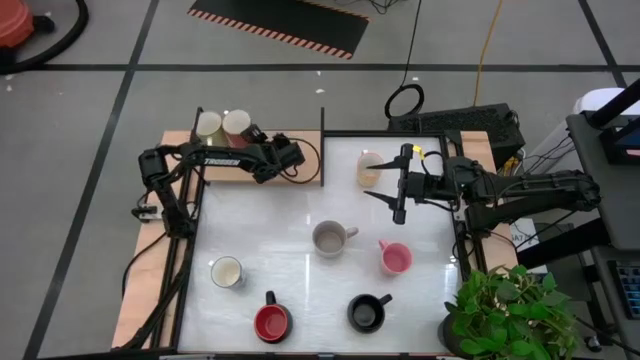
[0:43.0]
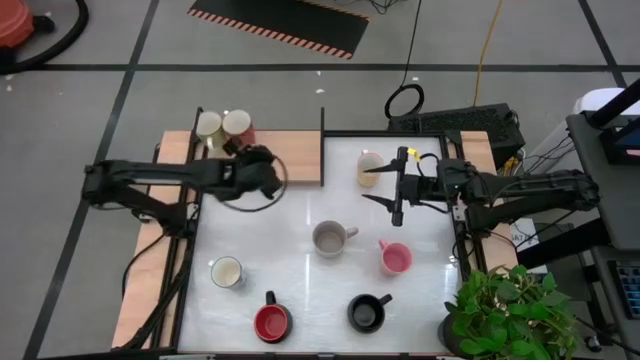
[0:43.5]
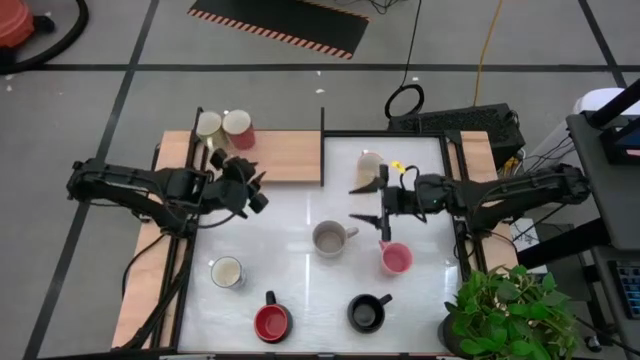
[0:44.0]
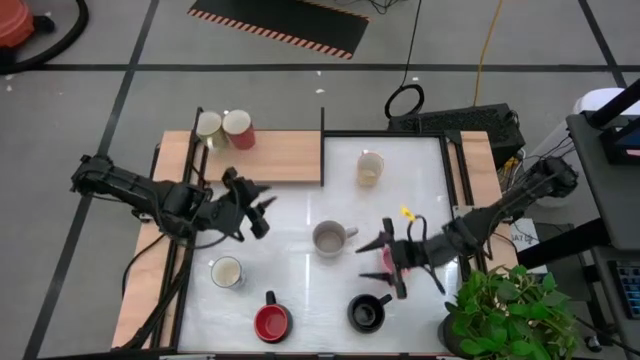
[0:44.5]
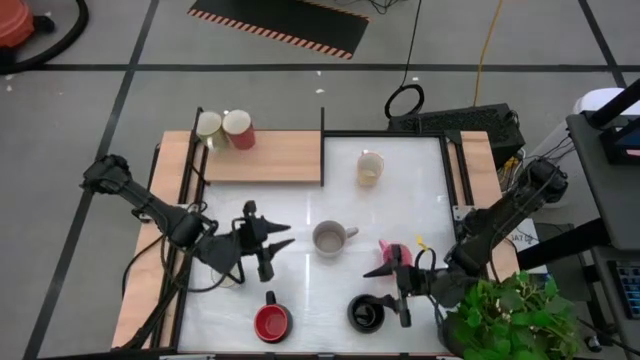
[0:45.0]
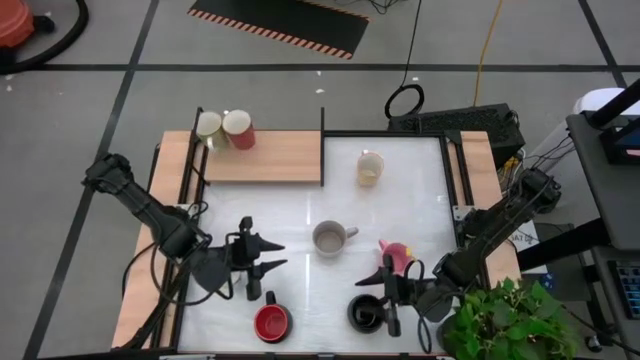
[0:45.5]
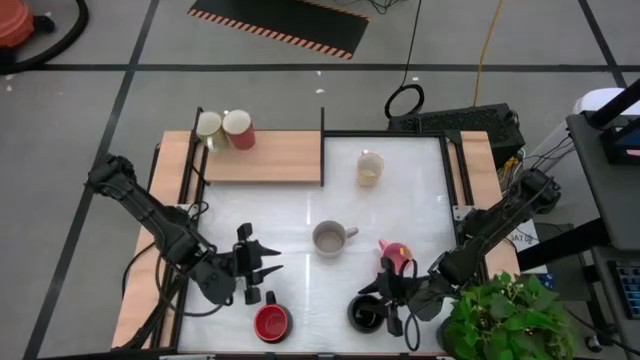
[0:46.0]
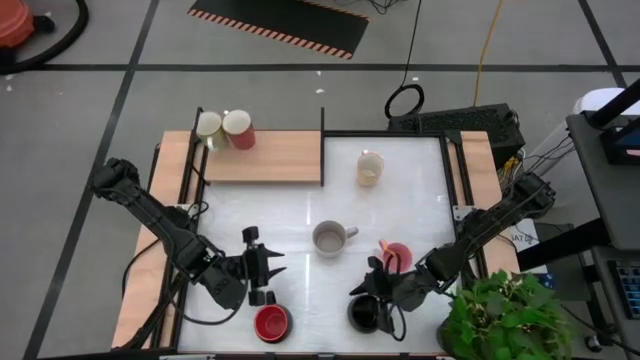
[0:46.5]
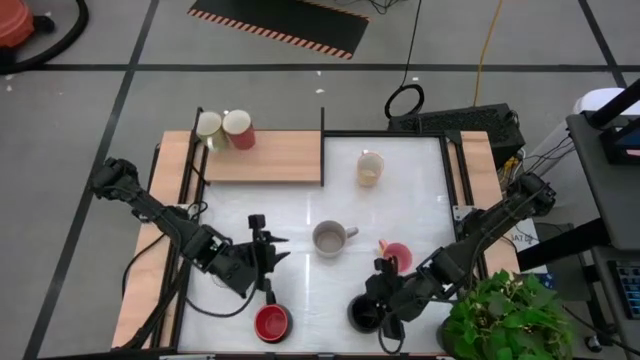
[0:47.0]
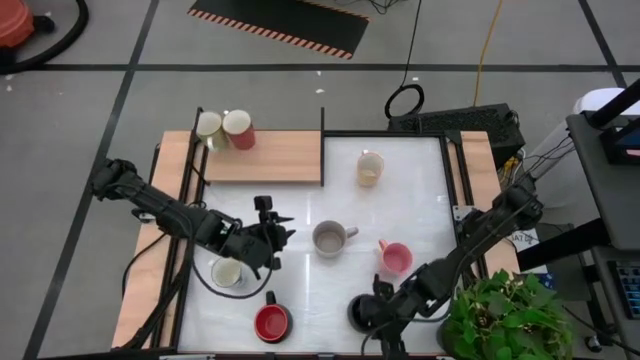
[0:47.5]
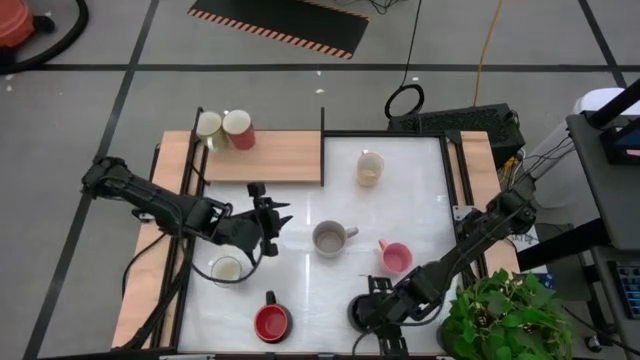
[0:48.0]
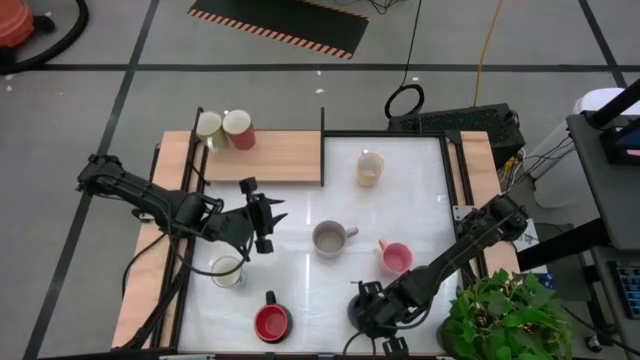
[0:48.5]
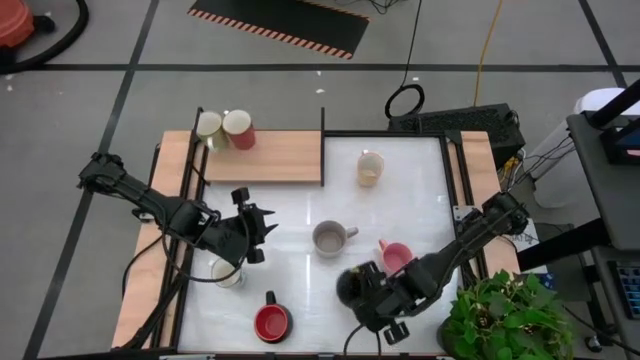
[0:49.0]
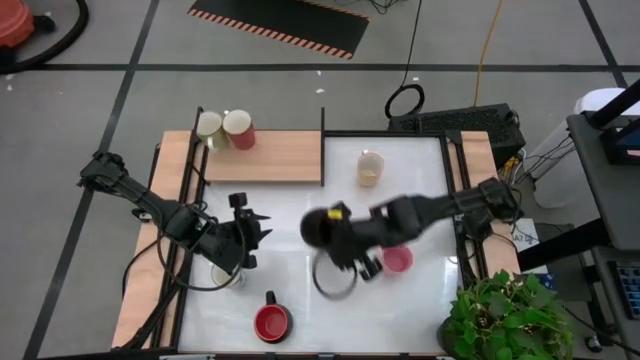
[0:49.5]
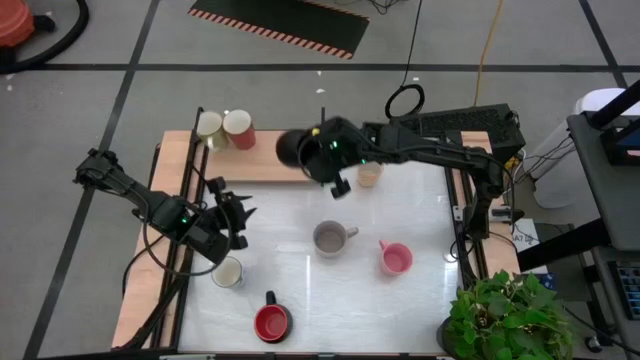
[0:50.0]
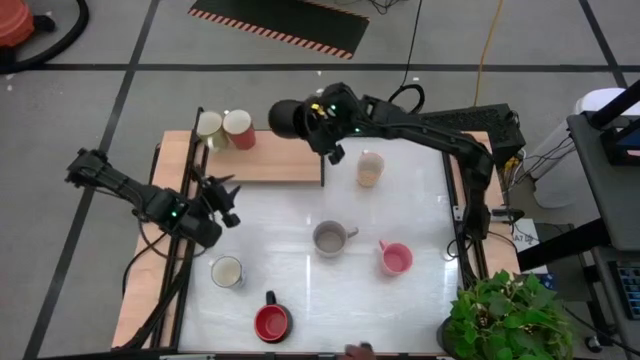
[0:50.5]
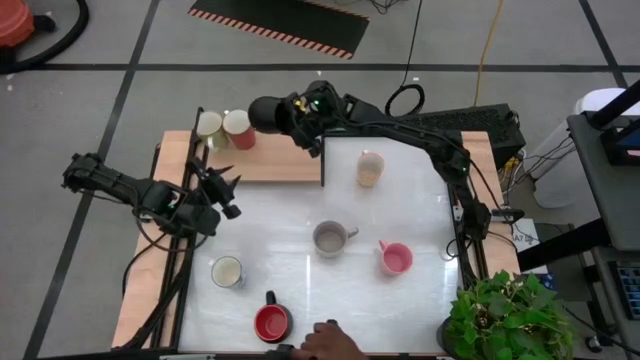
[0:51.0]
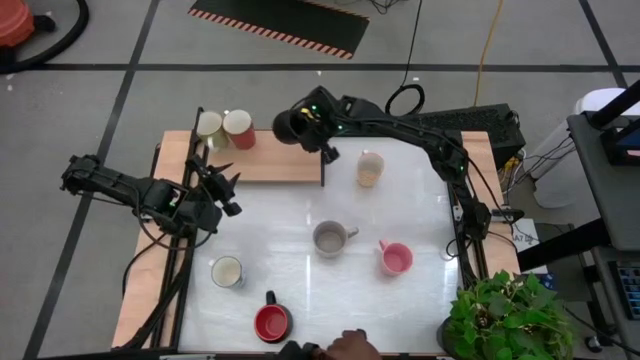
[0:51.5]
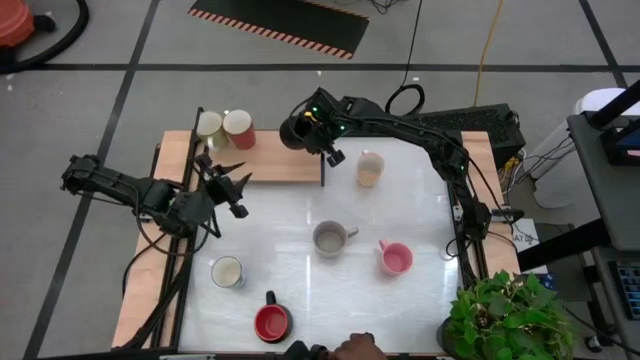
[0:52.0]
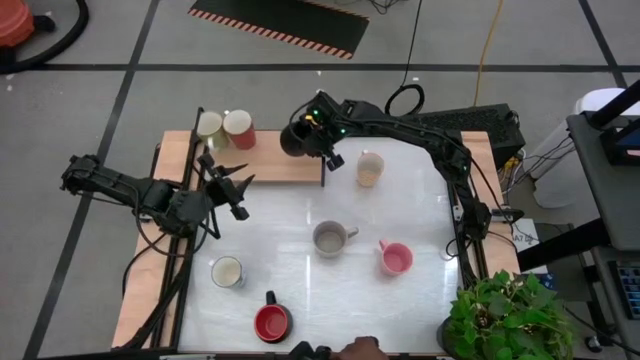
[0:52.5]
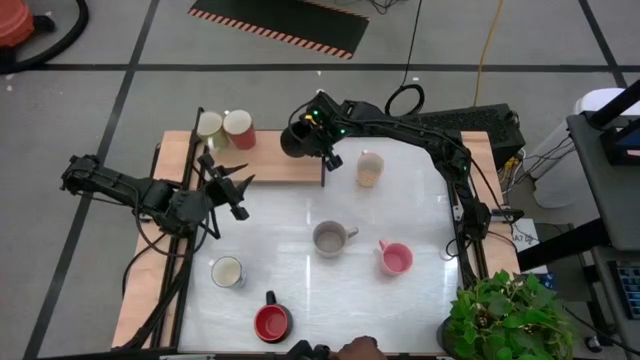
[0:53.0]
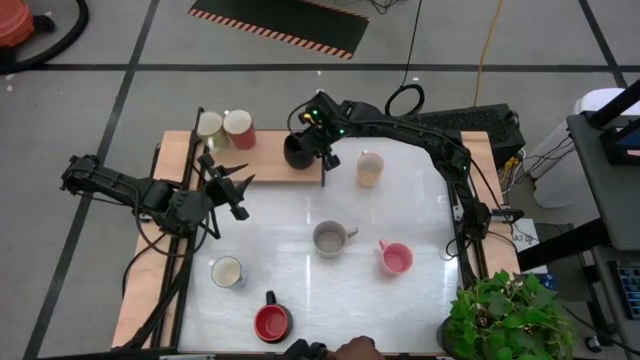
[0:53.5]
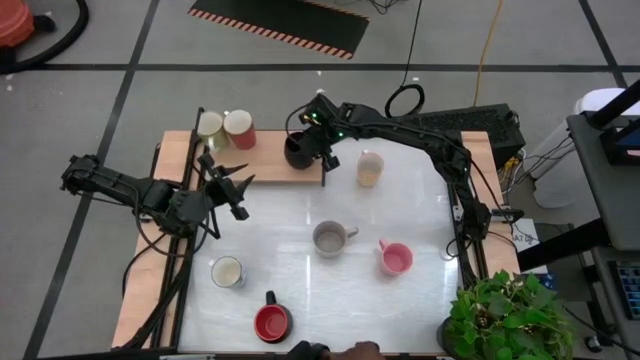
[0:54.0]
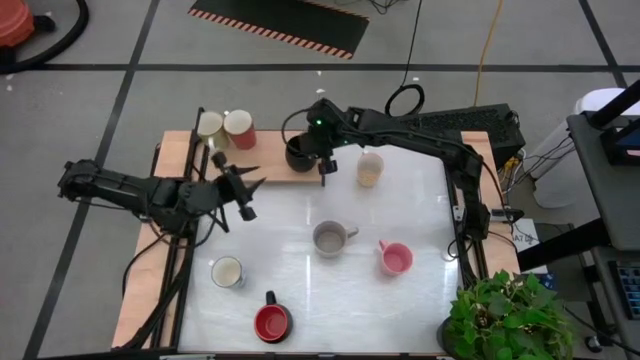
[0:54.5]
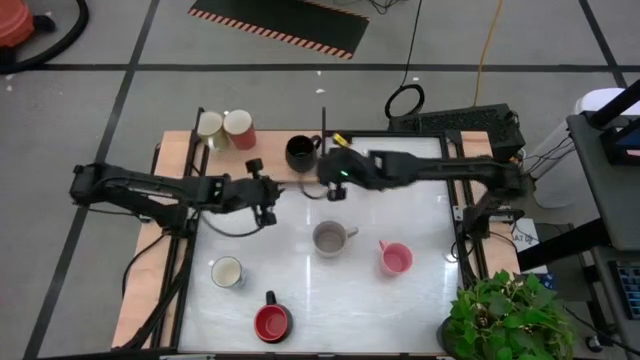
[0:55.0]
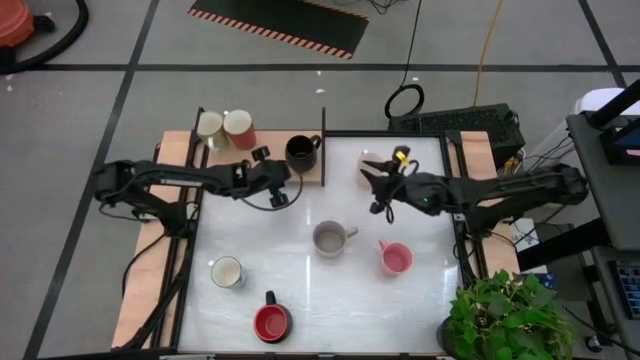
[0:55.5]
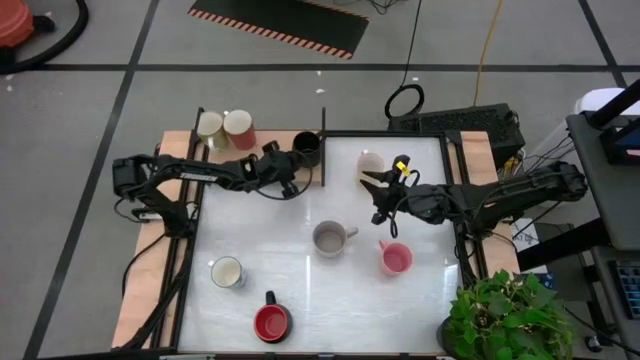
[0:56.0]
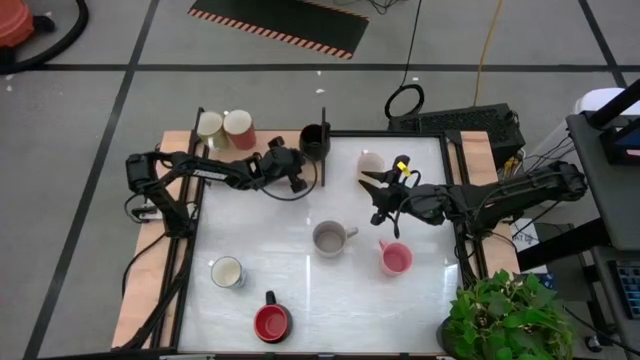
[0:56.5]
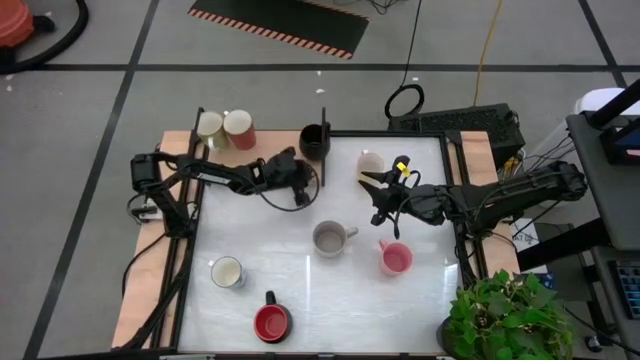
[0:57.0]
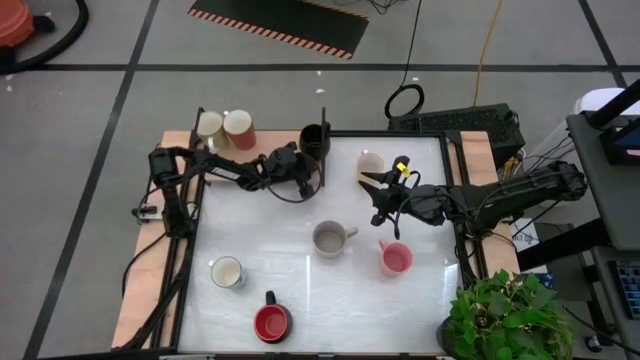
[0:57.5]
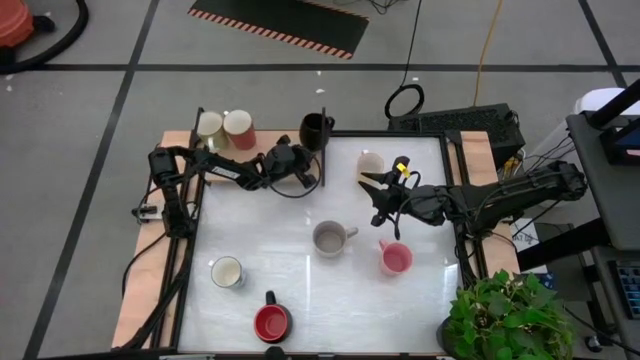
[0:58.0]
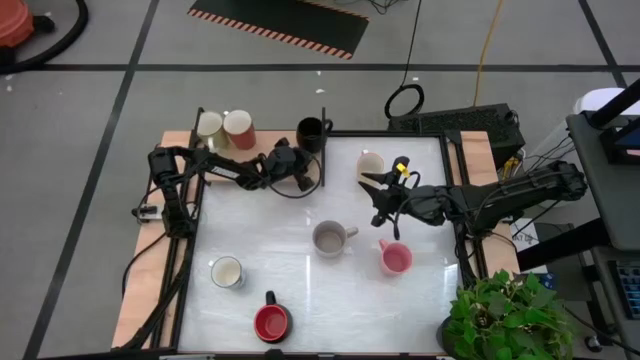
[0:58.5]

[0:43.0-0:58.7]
Task: Place coffee mugs
Put the black mug on the shelf

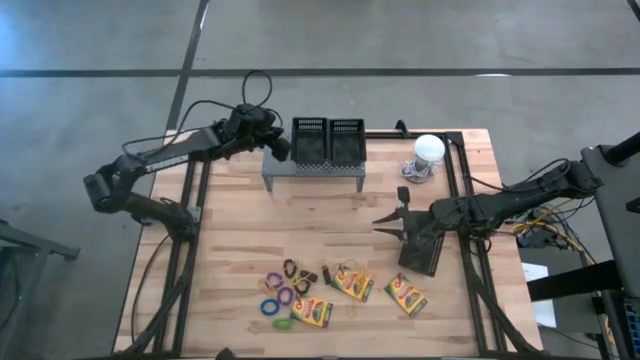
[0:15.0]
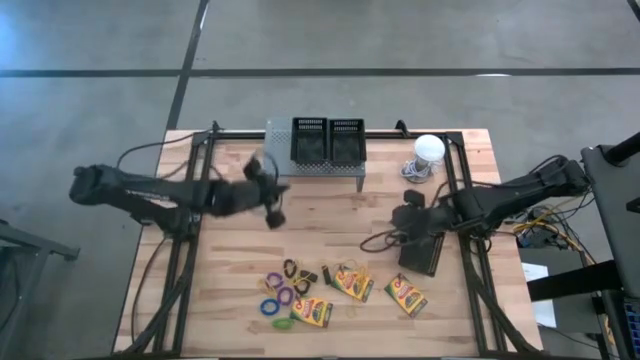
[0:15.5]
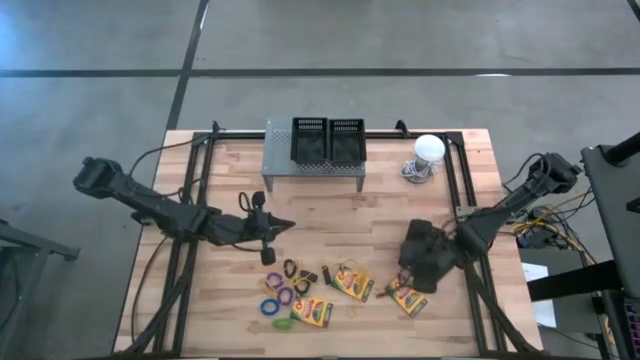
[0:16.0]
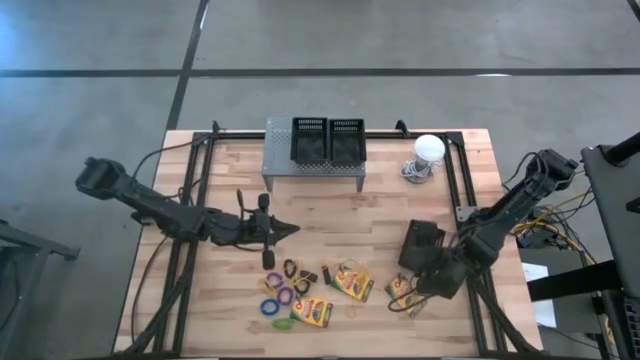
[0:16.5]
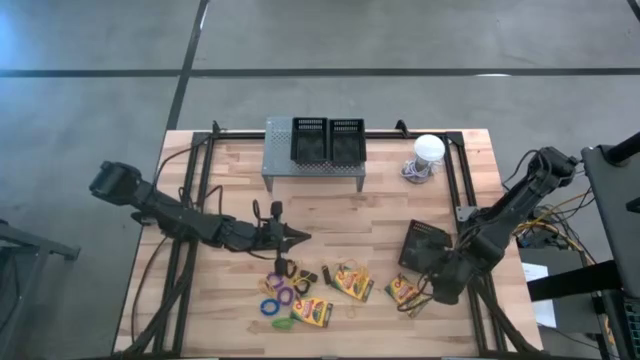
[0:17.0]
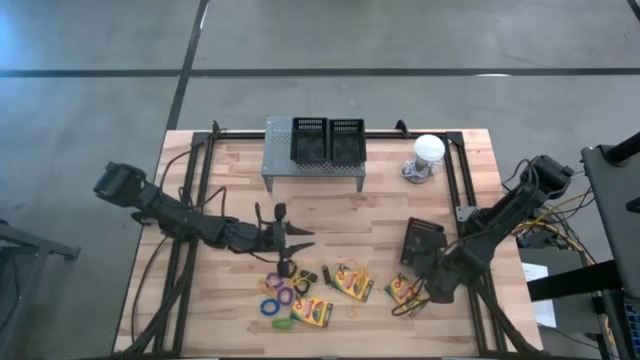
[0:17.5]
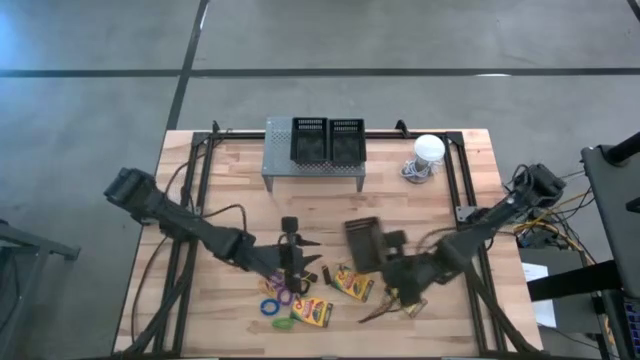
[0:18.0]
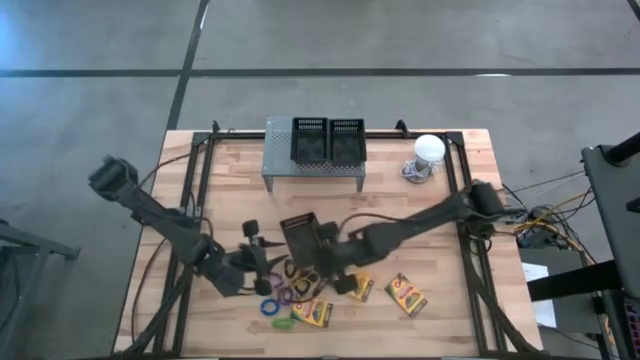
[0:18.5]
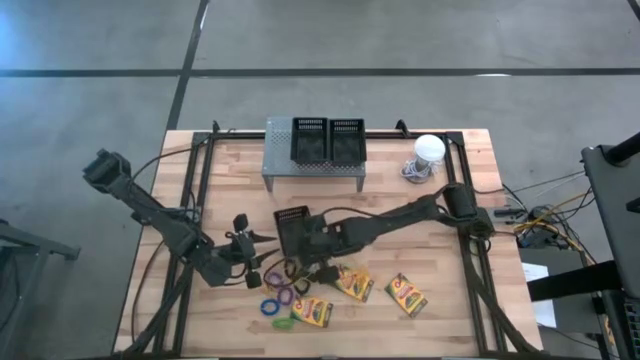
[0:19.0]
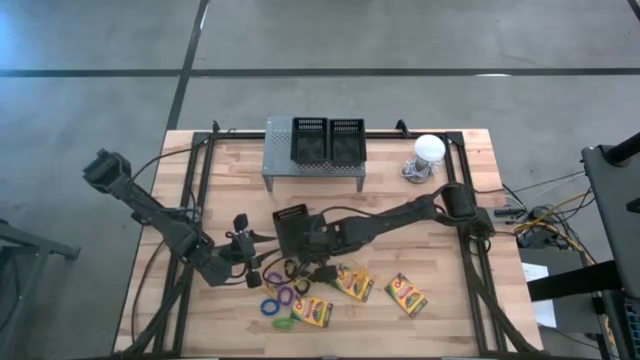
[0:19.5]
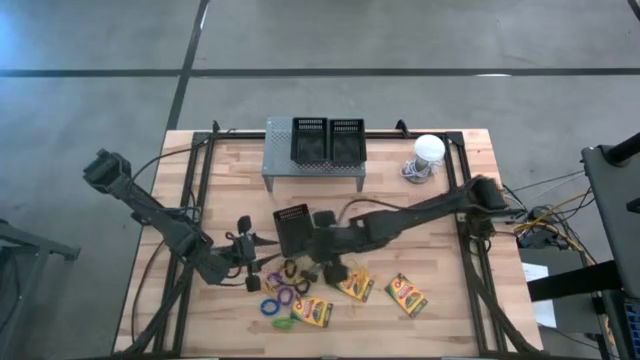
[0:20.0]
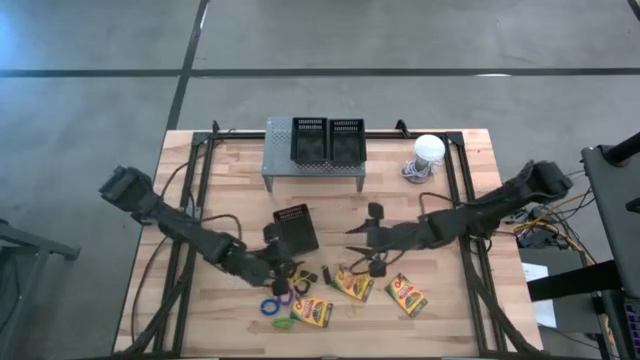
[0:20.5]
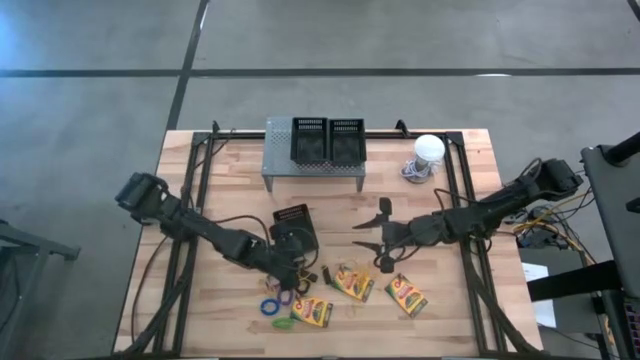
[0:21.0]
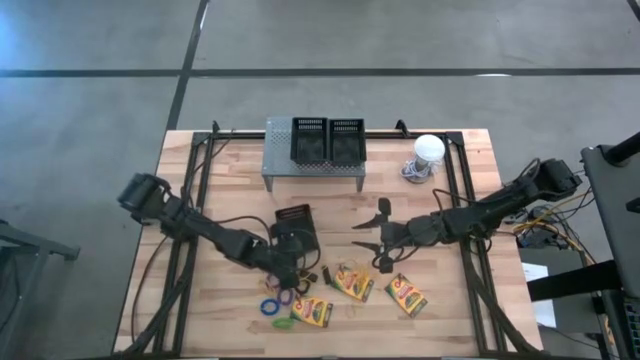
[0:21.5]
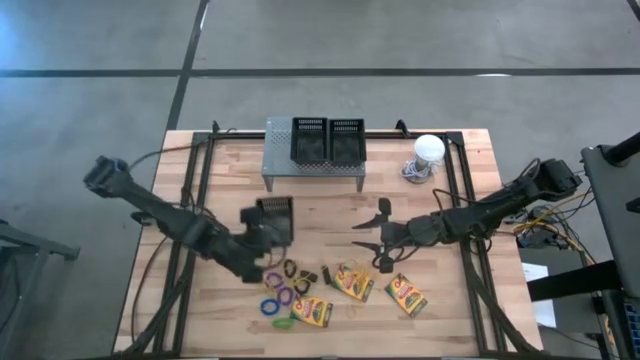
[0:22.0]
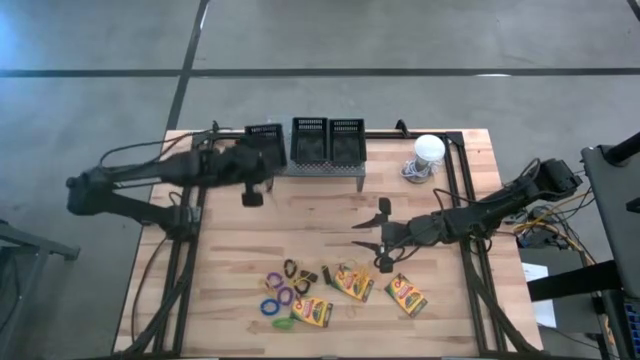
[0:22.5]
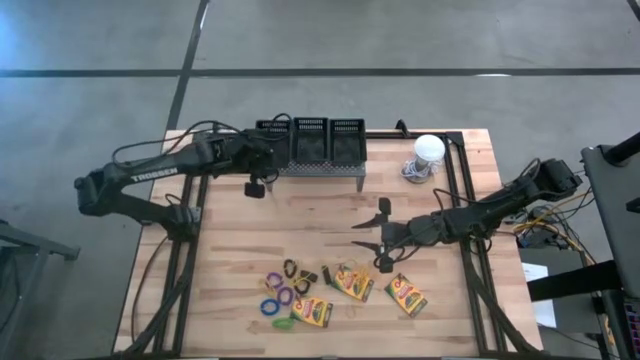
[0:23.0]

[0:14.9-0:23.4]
Task: Pick & Place Office Desk Supplies
Put the black basket on the shelf
